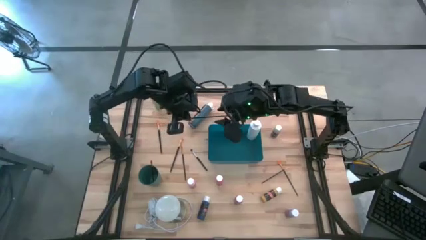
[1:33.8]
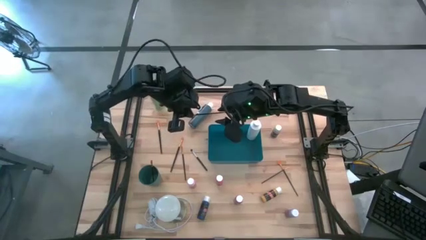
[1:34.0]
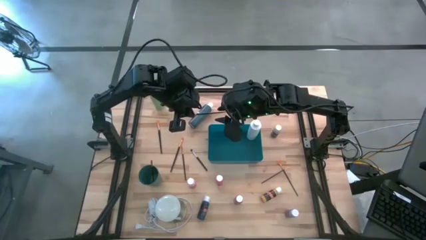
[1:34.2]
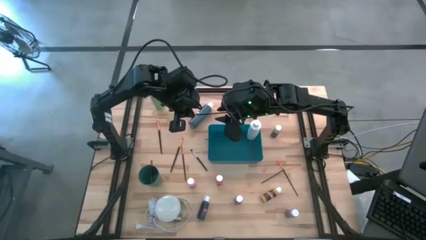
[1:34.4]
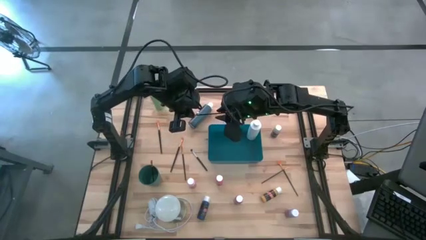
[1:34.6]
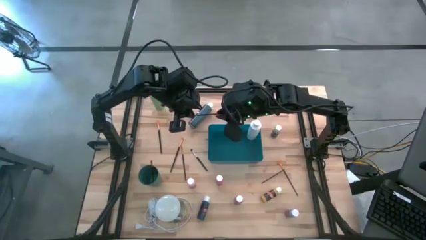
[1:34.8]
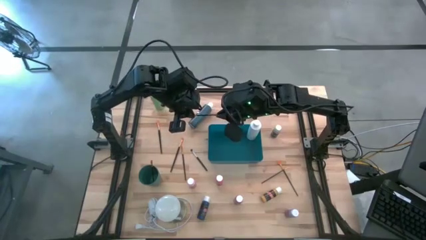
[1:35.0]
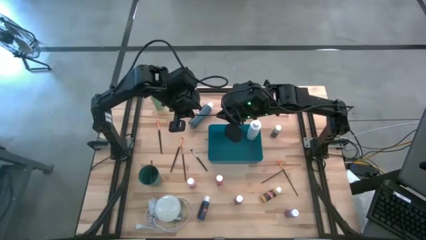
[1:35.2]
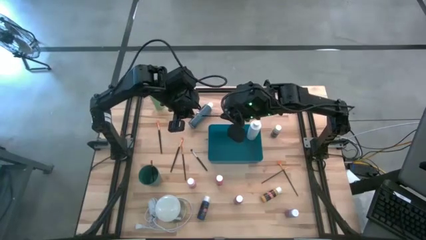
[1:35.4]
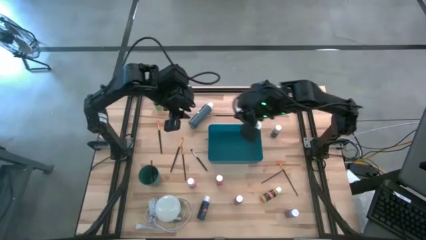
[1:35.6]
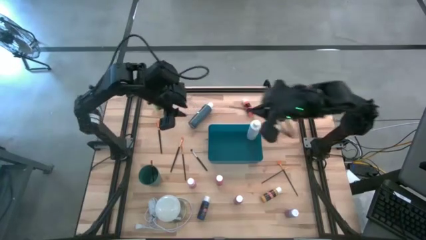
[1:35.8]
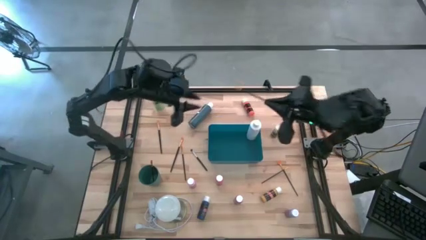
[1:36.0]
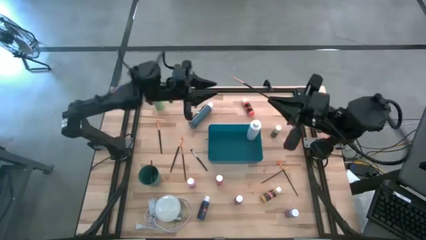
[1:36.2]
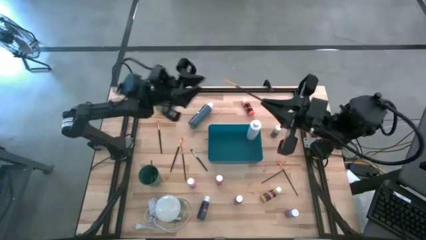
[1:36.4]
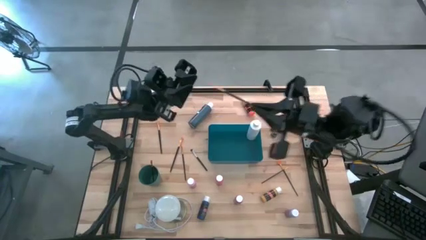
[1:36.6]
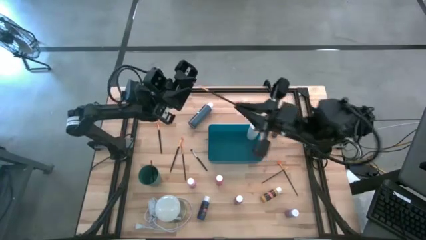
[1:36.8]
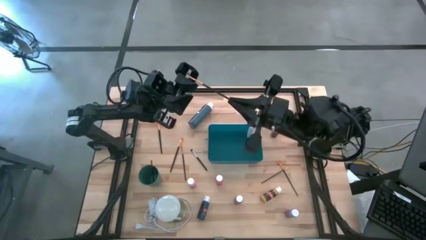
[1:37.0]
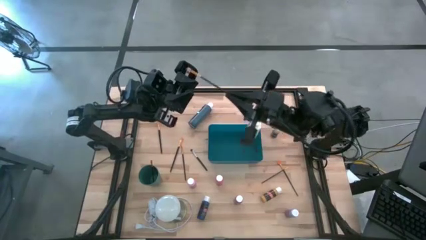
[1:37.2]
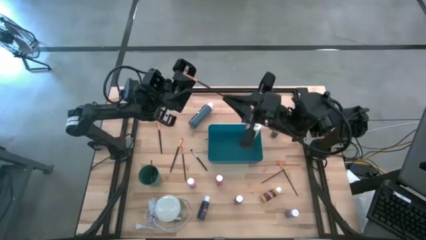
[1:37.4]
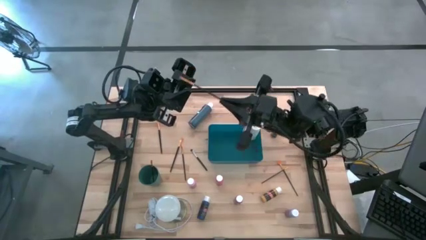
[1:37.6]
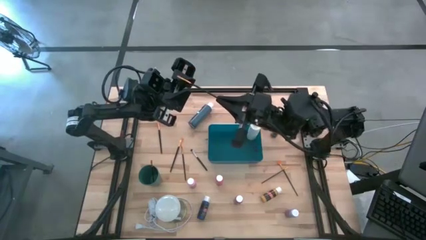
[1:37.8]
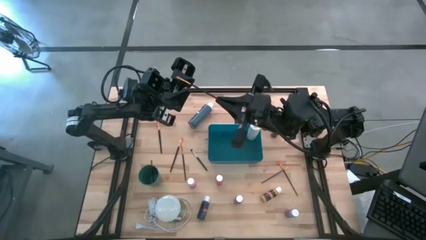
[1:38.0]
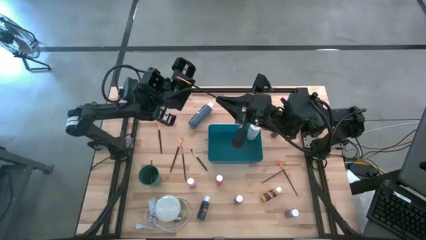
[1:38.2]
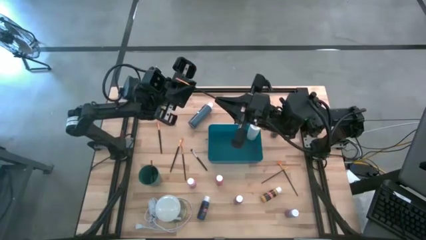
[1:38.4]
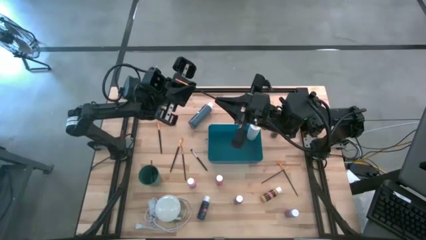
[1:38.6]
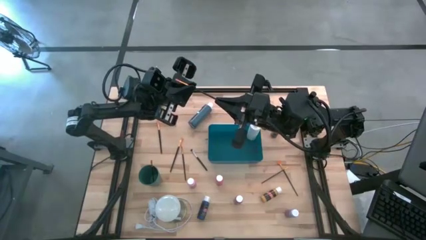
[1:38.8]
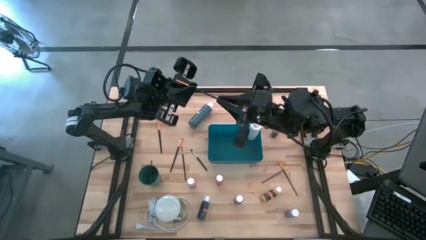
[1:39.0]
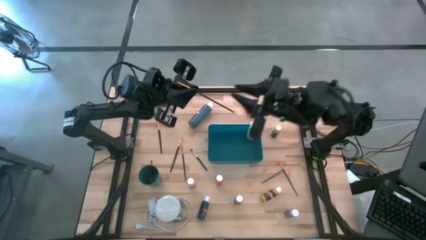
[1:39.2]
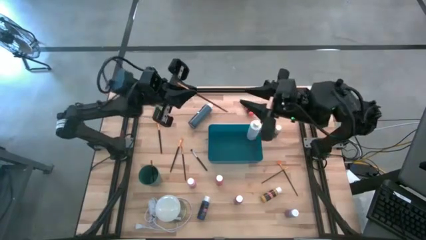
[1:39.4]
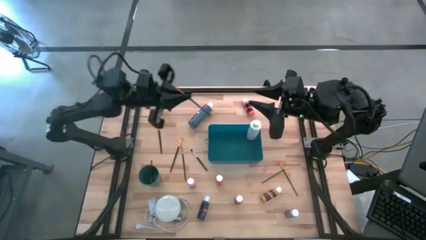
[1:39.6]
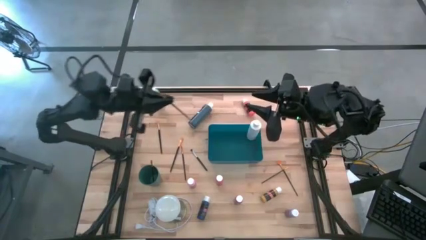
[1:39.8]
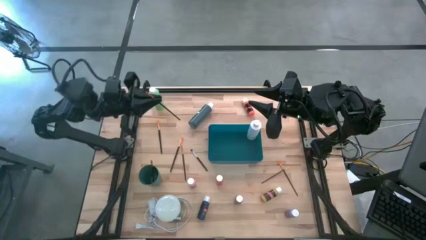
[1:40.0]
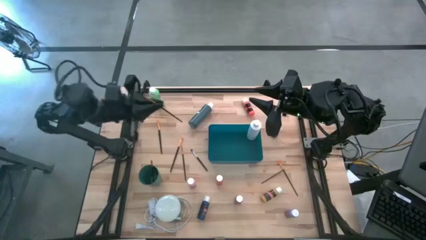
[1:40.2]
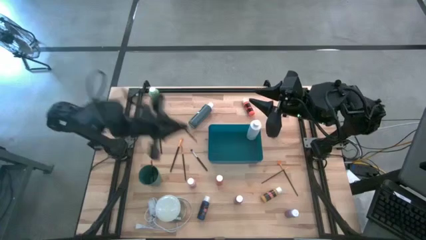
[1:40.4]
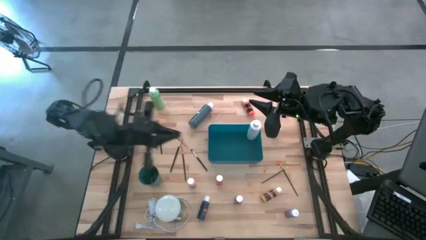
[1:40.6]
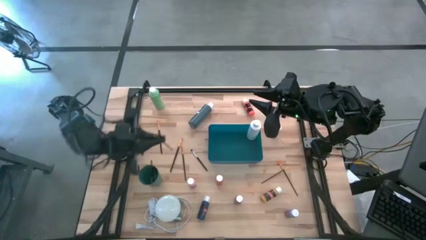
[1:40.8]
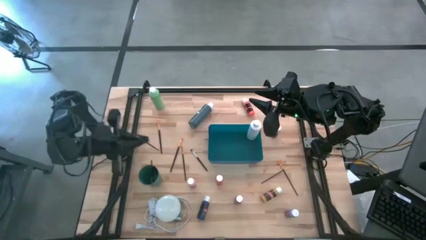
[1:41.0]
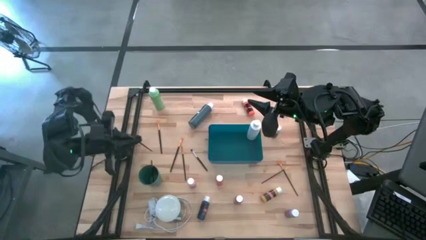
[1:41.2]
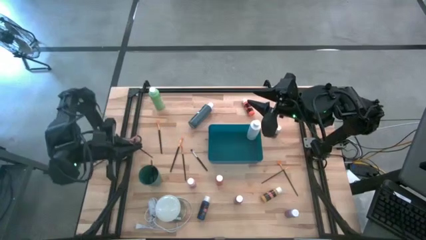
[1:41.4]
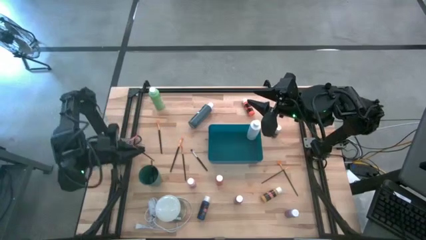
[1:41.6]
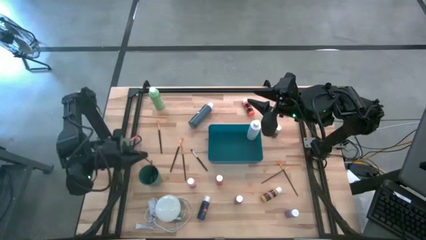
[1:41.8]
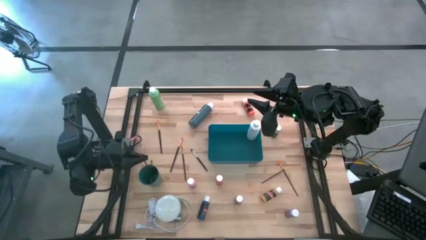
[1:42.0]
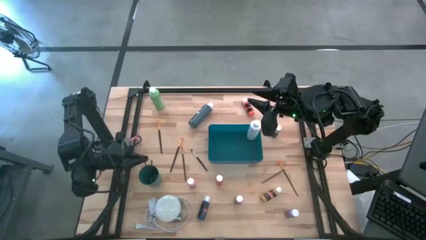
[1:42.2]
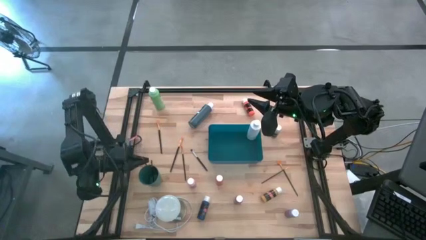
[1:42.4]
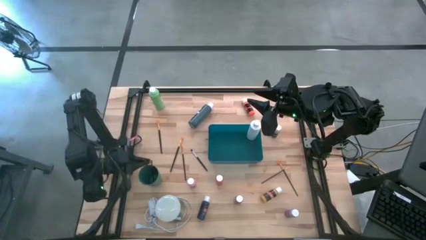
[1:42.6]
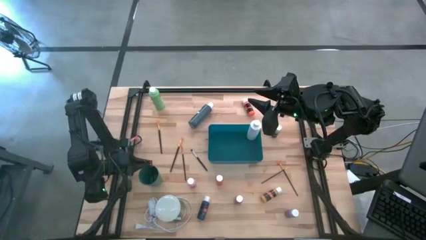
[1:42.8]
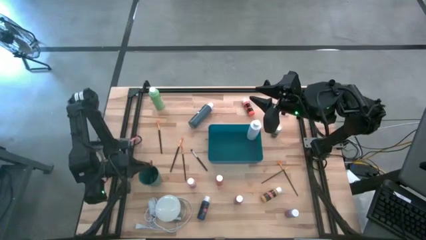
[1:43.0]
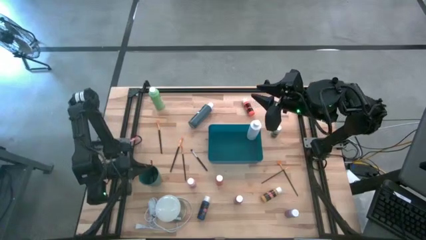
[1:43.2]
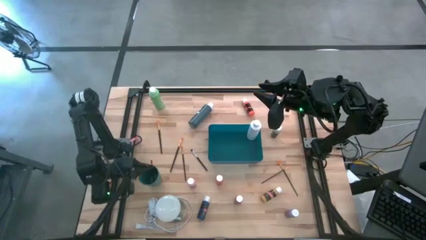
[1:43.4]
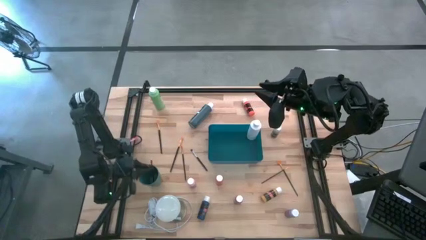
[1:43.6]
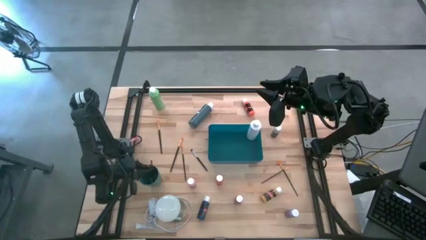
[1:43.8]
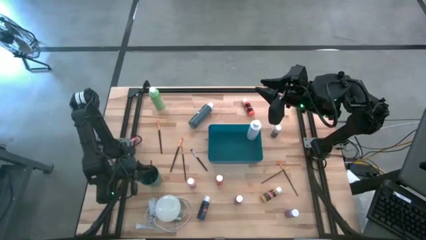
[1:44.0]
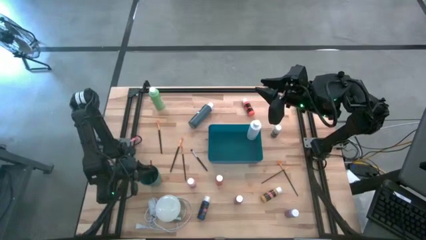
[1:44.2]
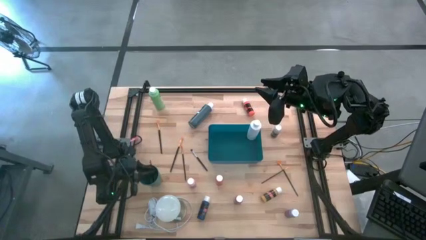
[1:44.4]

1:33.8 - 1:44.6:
Task: Pick & Place Paint Supplies
Put the gold paintbrush into the green cup

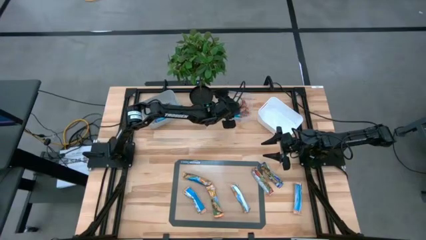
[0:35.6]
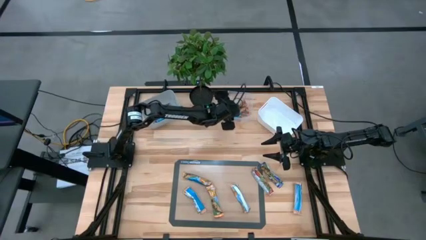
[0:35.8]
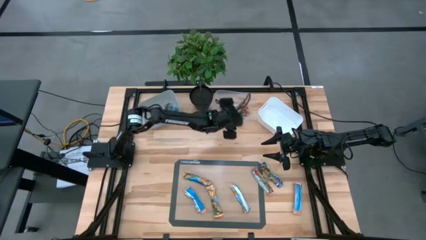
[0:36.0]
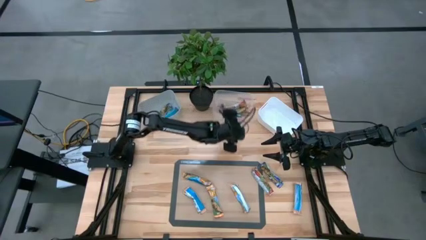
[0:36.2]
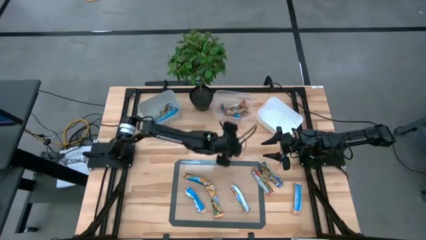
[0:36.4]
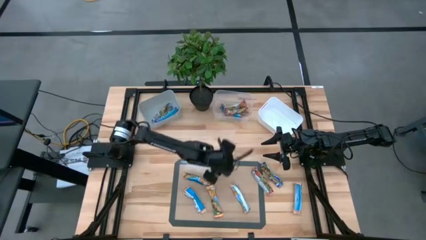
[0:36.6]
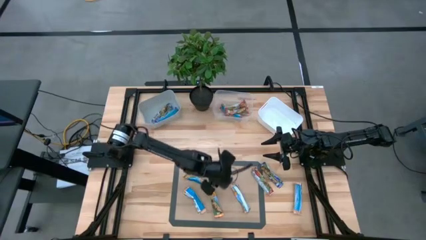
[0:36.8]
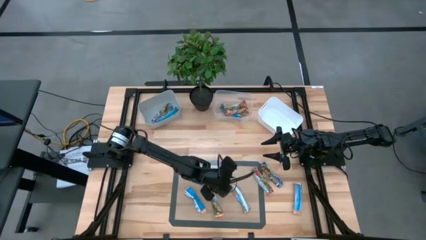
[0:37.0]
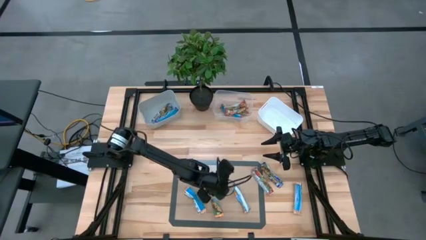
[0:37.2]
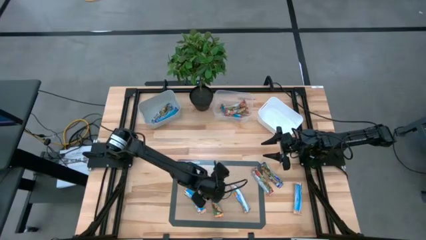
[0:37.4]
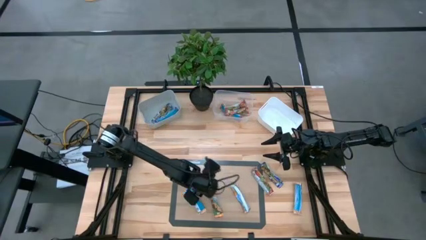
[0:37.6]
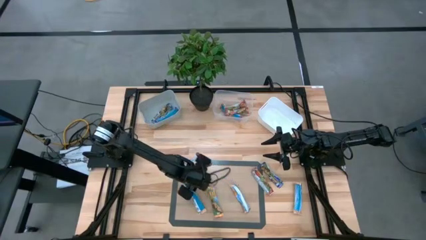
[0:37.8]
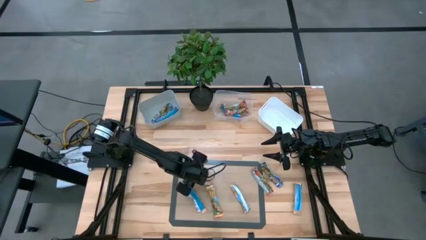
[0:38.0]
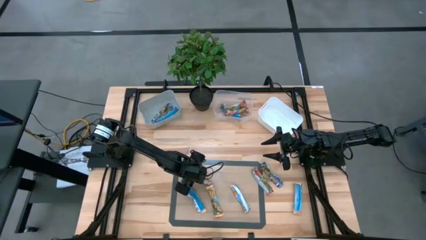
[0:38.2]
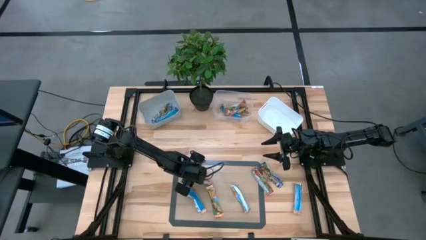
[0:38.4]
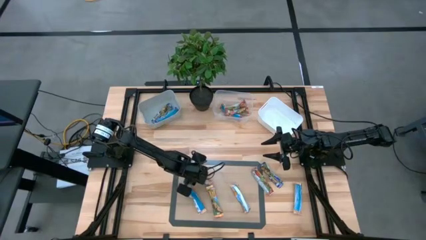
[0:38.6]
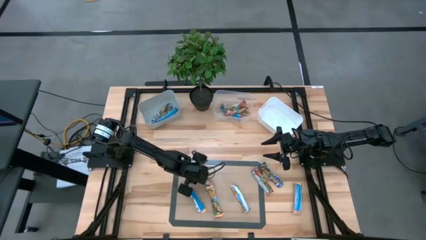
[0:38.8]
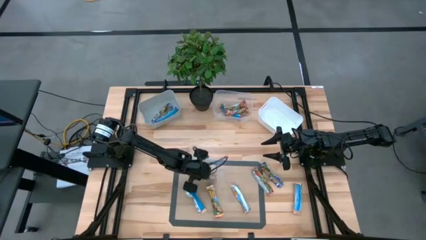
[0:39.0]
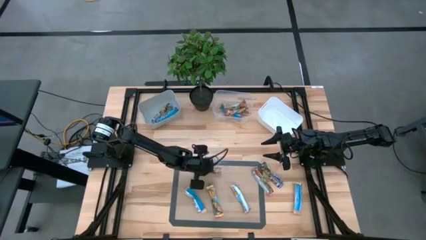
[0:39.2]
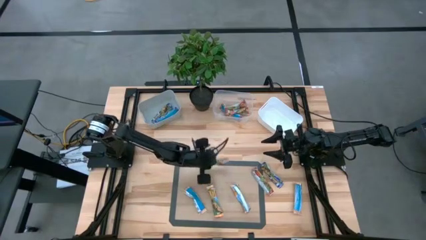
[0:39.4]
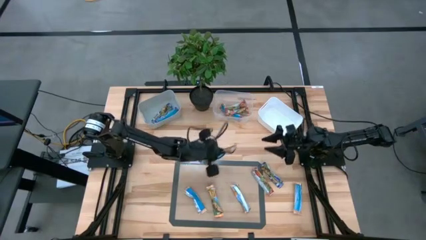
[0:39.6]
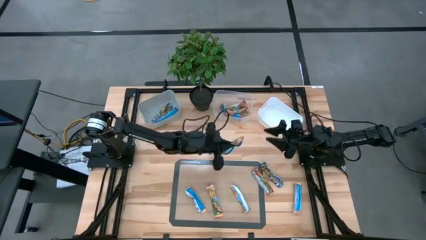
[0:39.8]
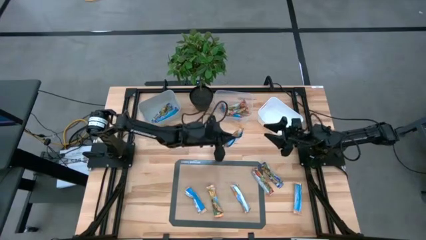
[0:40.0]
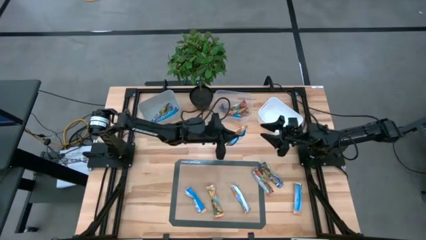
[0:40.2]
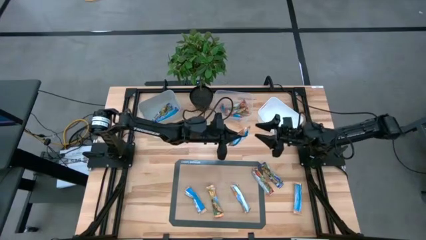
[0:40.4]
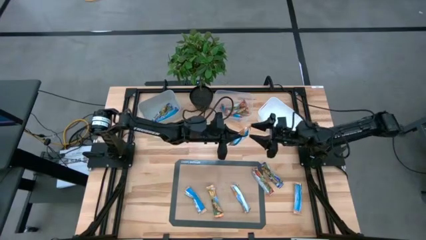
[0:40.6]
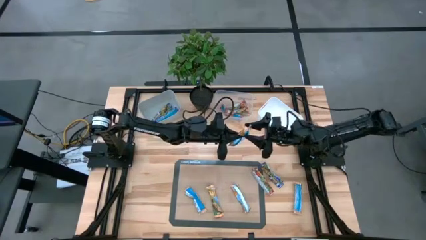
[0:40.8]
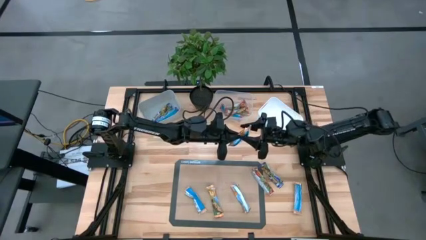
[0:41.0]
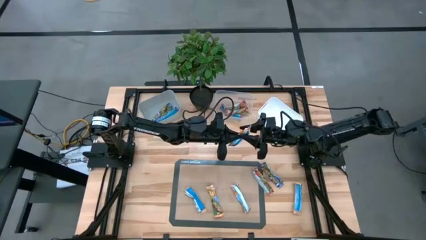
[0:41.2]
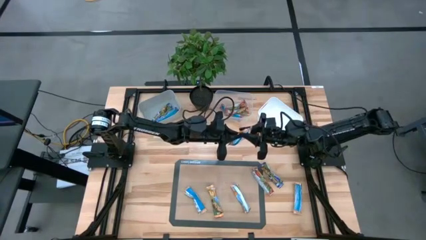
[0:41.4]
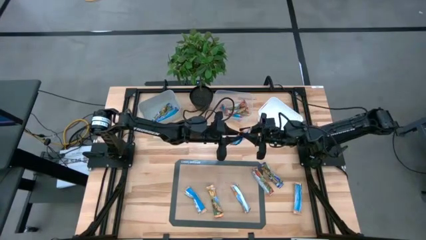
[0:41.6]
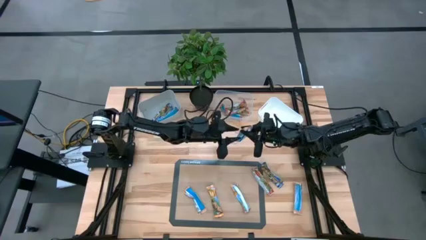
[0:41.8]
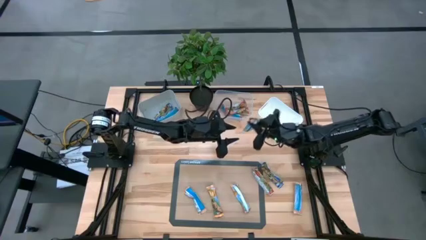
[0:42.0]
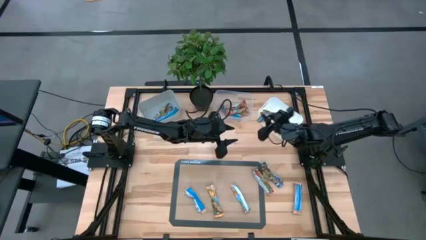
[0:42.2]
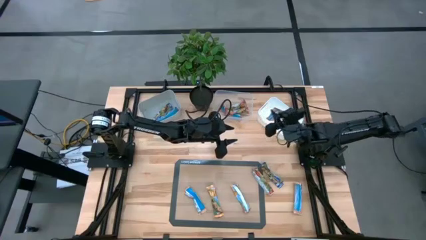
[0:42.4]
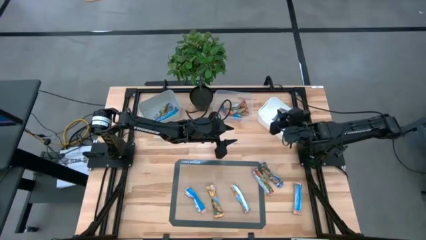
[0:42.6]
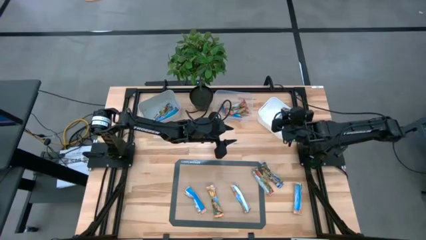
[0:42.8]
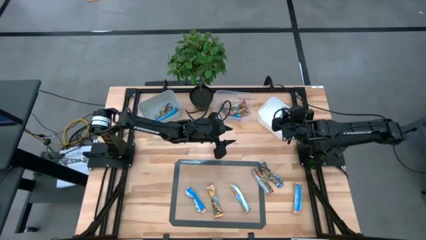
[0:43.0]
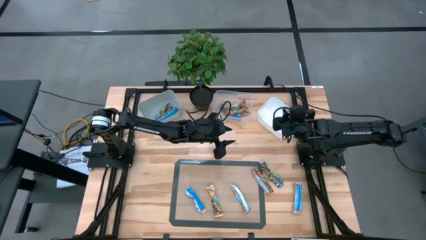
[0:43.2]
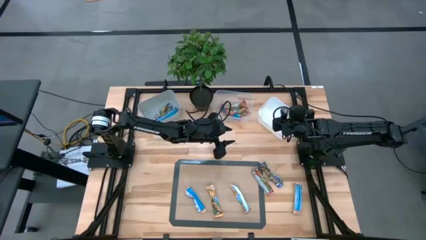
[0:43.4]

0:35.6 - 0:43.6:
Task: Pick and place Granola Bars by type
Put the yellow granola bar into the white bin
